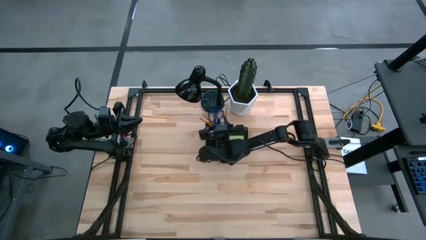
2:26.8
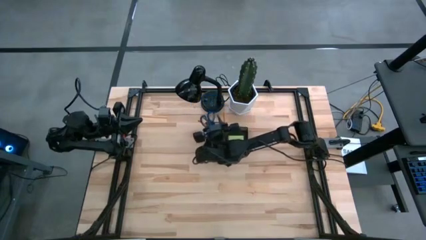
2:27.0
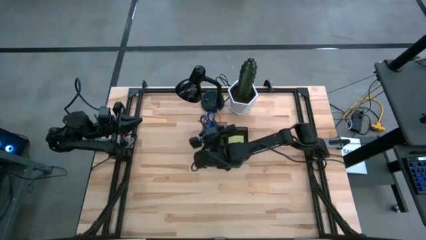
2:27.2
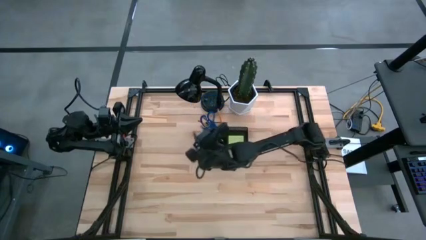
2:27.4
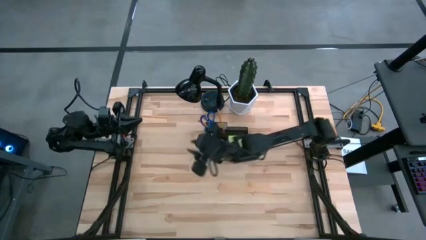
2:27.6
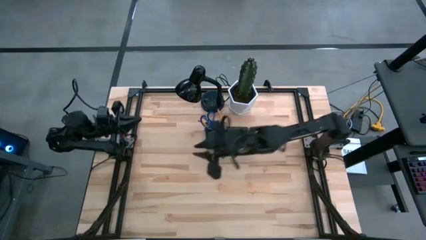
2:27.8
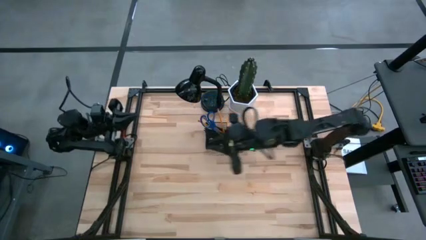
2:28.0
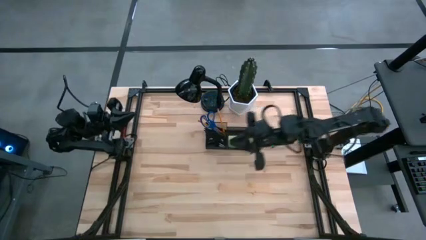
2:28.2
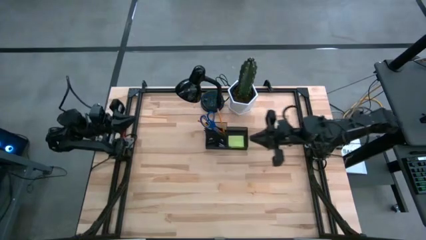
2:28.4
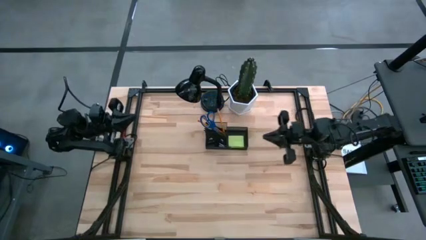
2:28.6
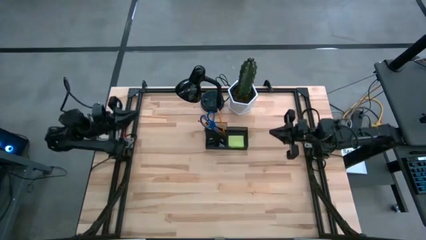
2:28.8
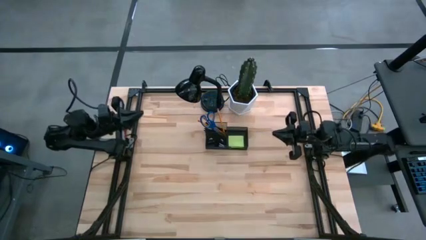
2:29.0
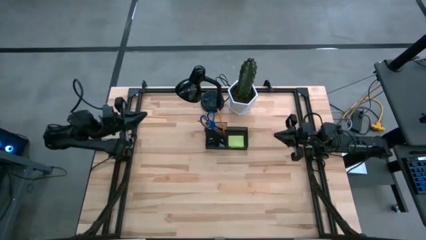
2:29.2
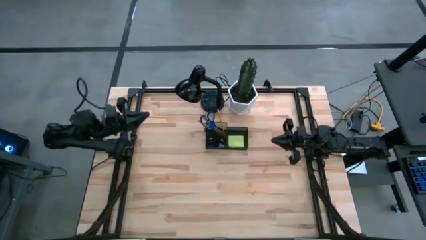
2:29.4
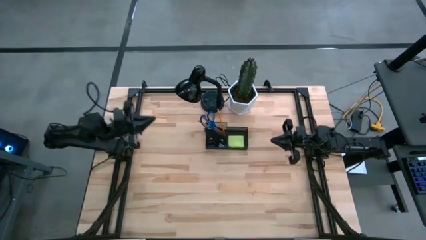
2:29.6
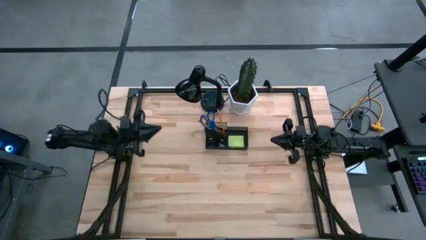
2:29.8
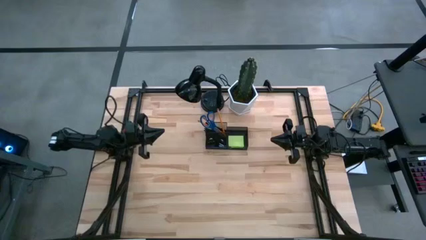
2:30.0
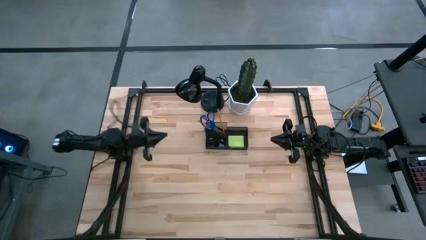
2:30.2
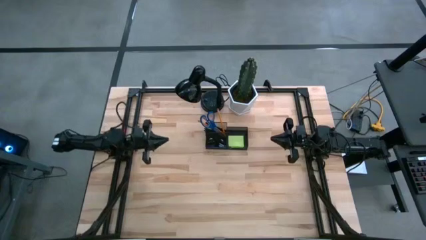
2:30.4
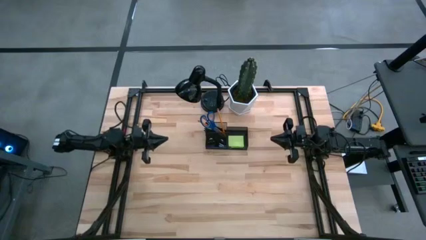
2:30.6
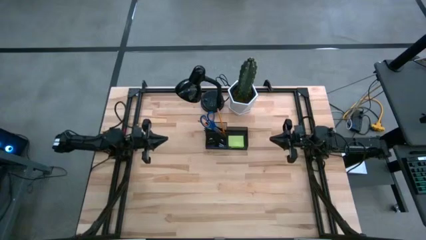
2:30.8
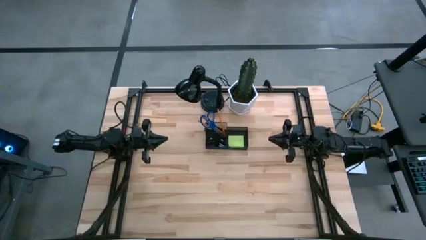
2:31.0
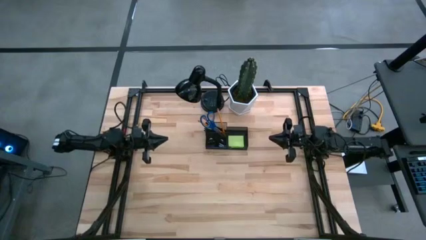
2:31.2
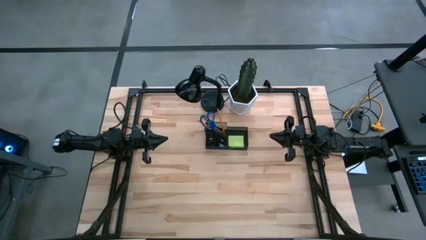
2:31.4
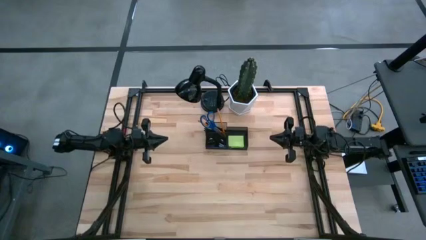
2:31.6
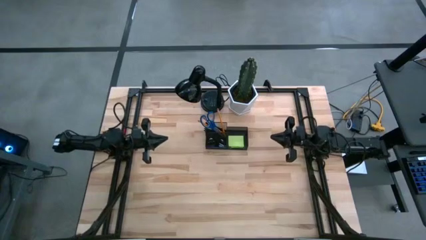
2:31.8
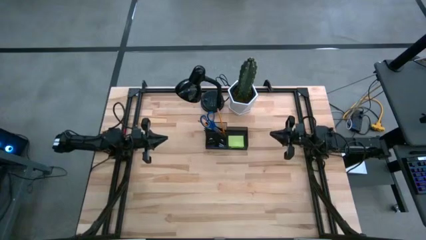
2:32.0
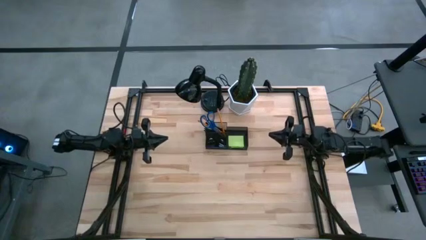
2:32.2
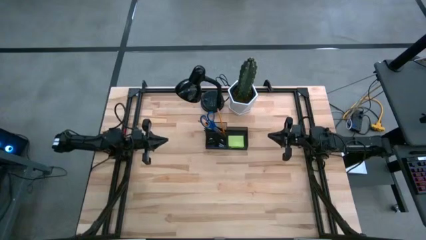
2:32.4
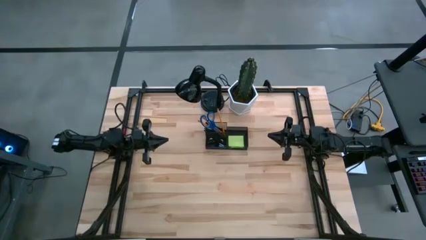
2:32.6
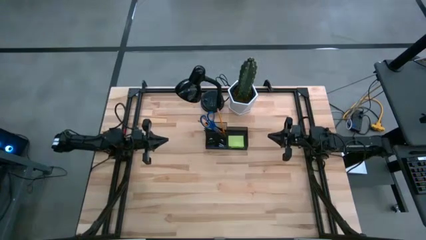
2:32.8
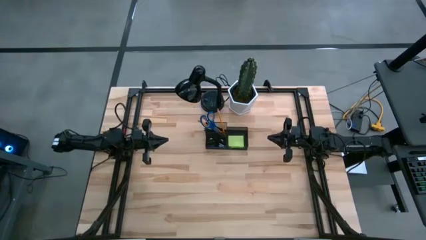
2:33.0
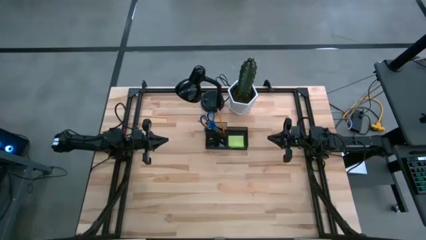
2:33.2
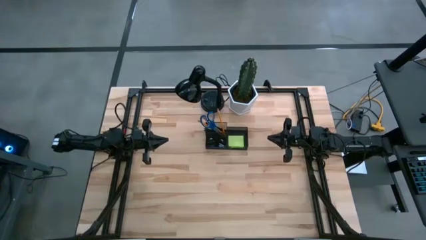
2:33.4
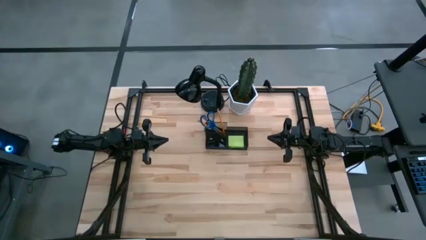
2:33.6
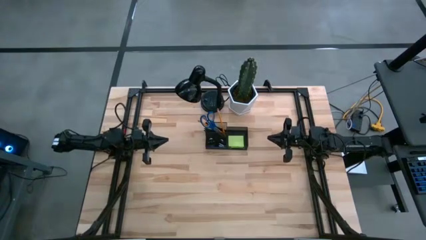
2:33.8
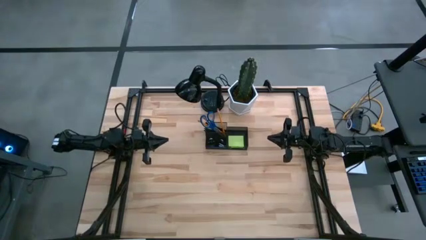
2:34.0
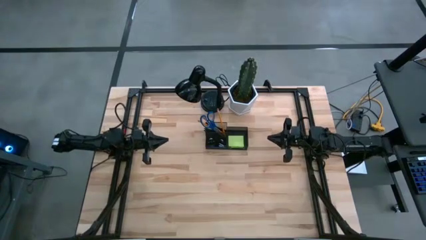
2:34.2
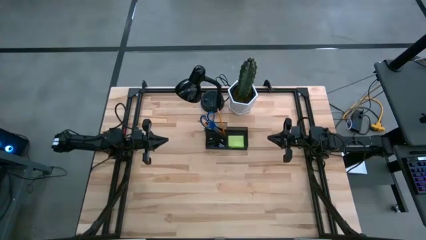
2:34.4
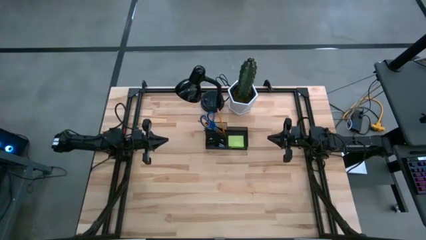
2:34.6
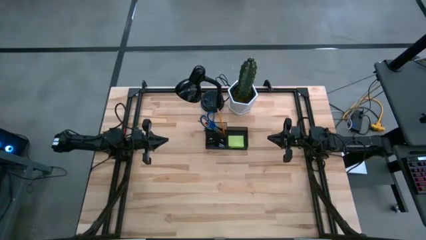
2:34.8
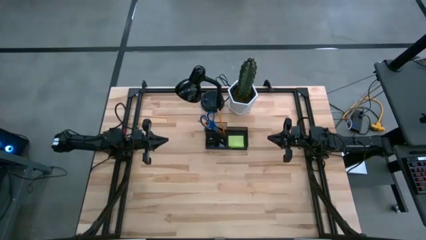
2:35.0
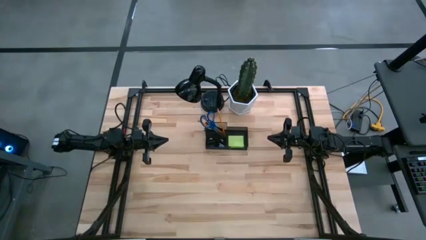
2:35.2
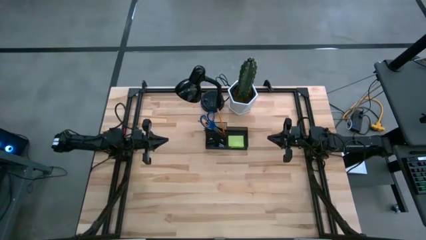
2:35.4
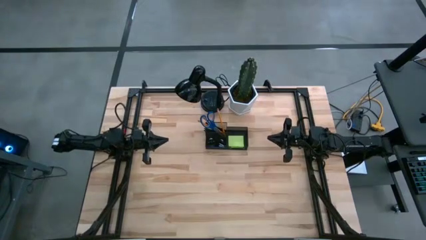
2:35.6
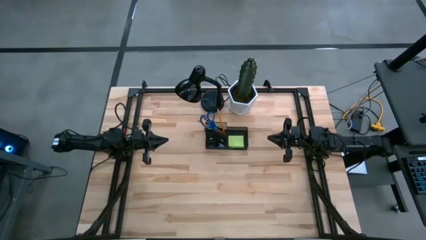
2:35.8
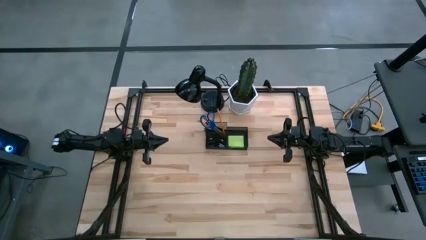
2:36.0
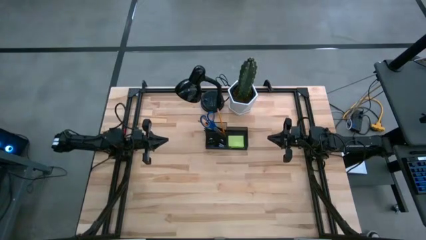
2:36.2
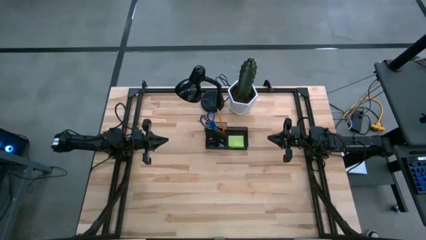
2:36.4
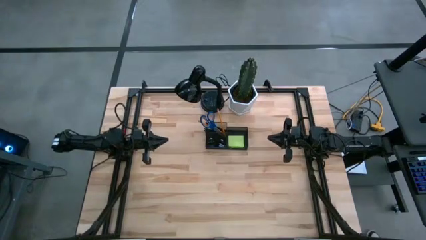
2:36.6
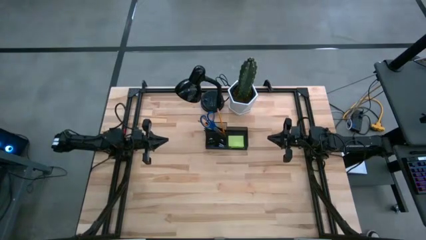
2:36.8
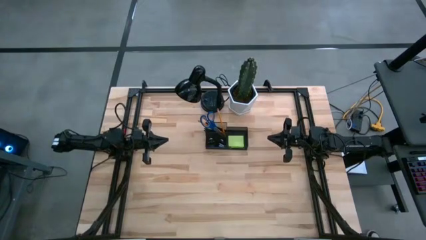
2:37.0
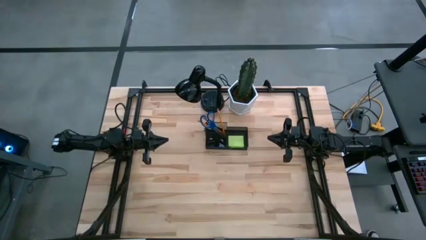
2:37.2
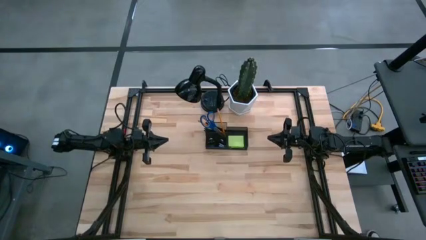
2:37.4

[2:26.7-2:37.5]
Task: Pick and place office supplies into organizer
Return to Home Position
